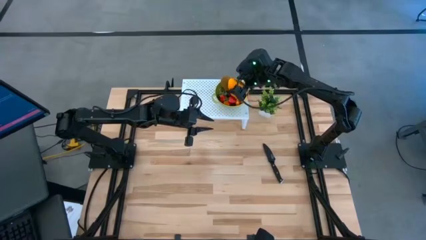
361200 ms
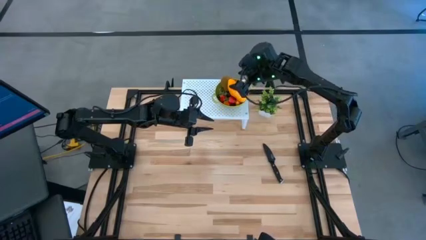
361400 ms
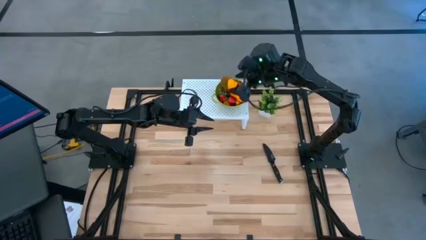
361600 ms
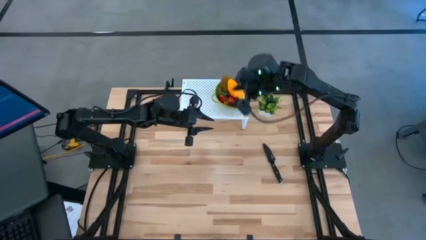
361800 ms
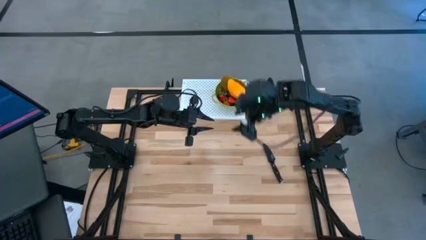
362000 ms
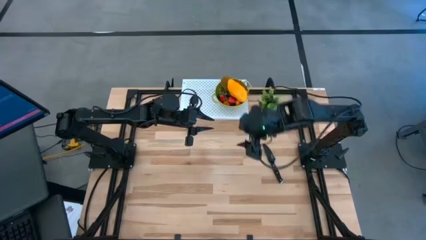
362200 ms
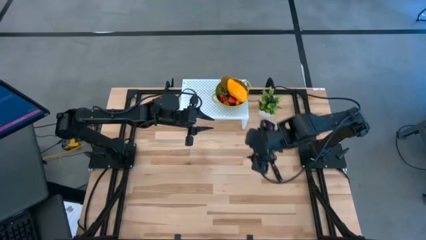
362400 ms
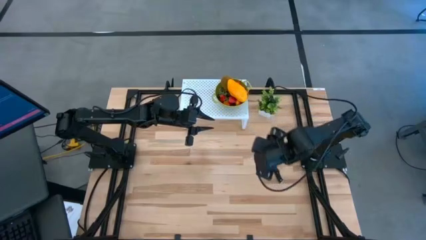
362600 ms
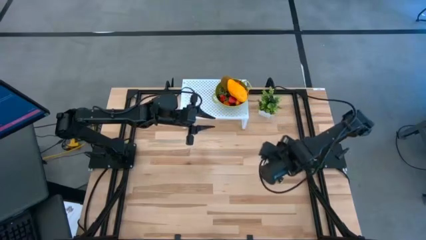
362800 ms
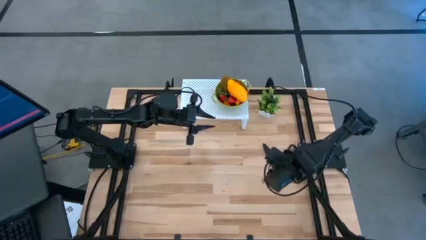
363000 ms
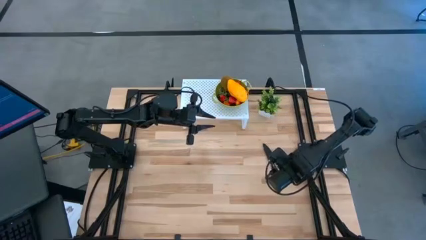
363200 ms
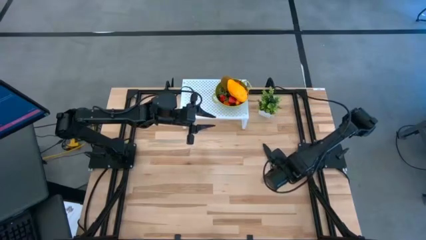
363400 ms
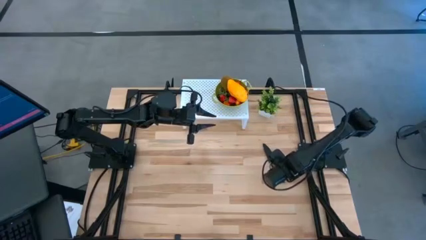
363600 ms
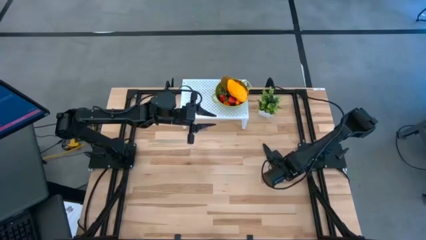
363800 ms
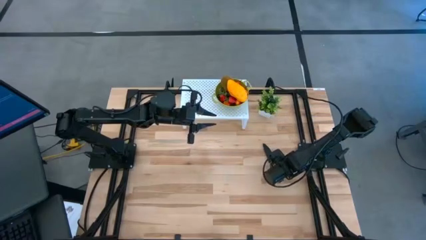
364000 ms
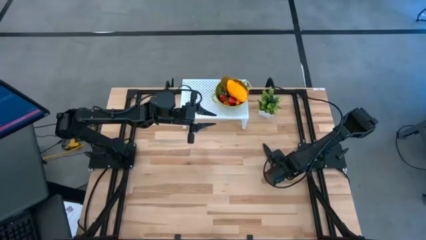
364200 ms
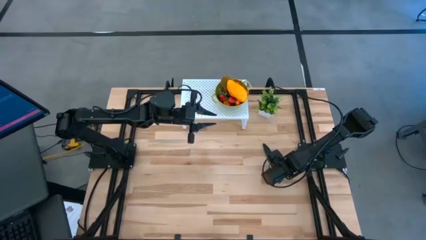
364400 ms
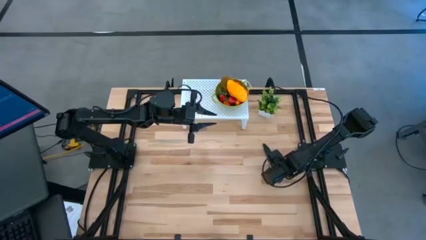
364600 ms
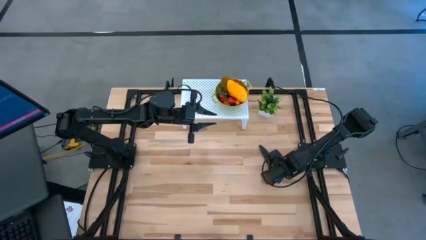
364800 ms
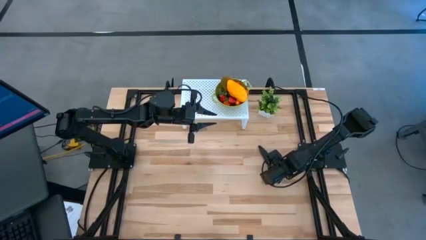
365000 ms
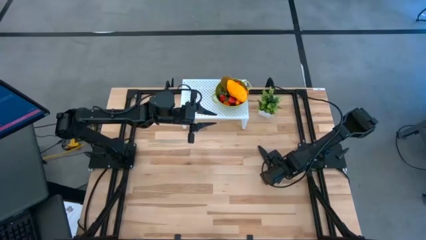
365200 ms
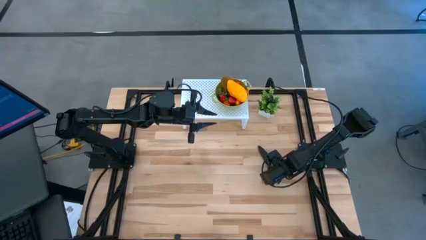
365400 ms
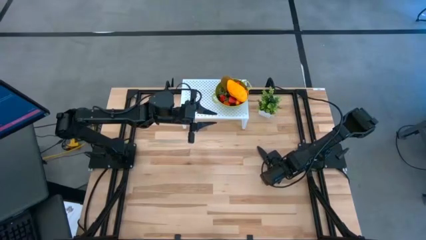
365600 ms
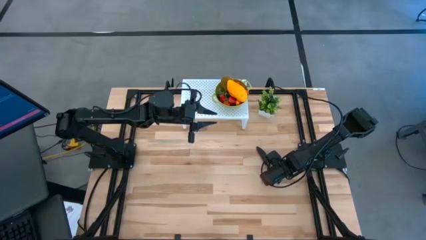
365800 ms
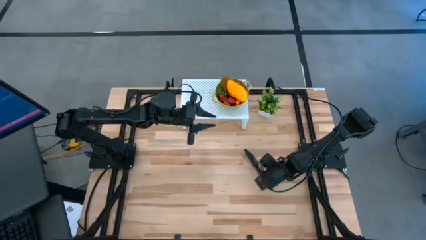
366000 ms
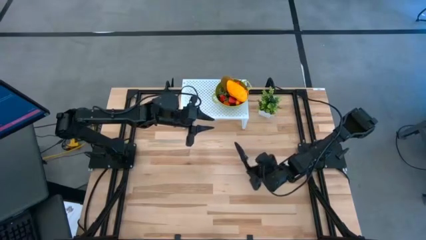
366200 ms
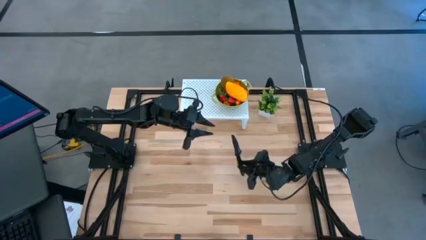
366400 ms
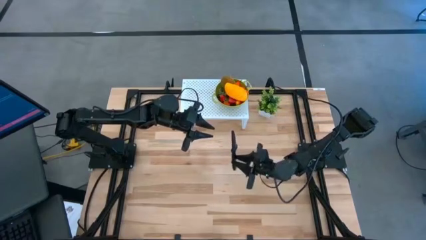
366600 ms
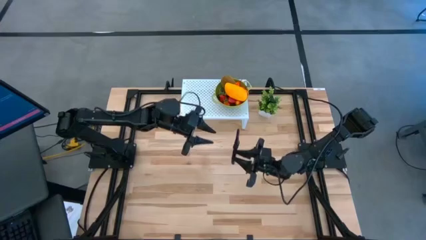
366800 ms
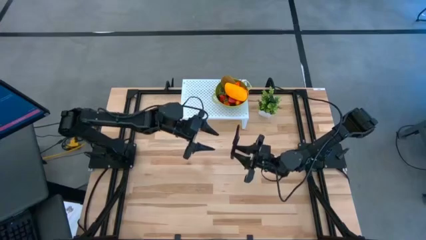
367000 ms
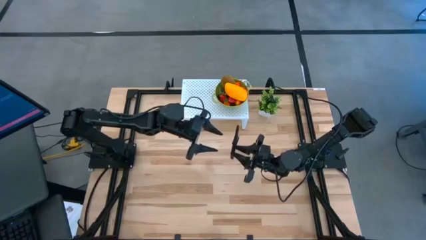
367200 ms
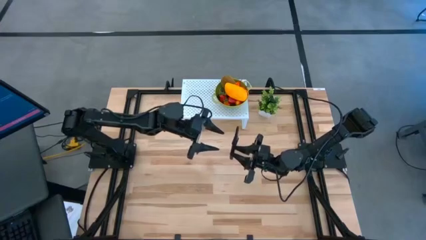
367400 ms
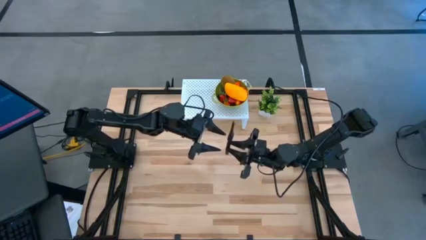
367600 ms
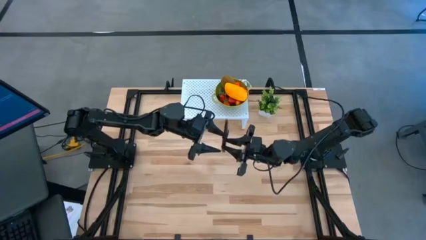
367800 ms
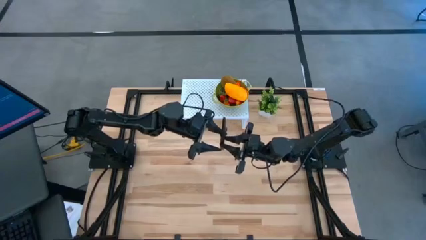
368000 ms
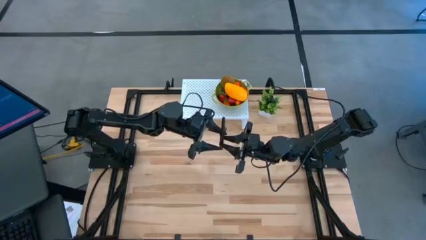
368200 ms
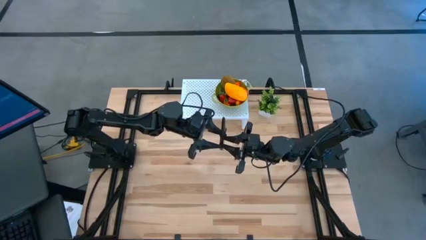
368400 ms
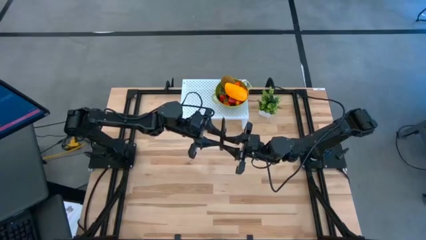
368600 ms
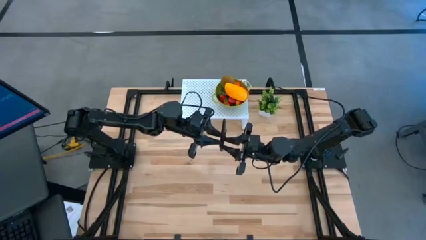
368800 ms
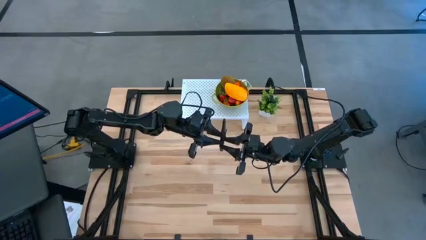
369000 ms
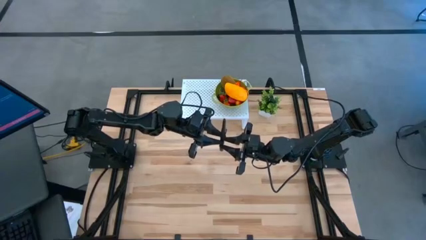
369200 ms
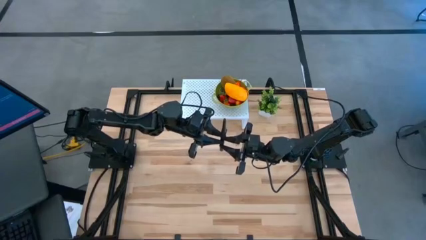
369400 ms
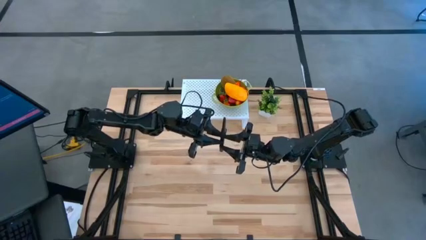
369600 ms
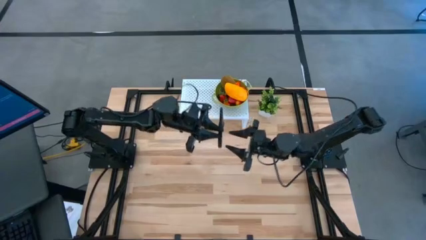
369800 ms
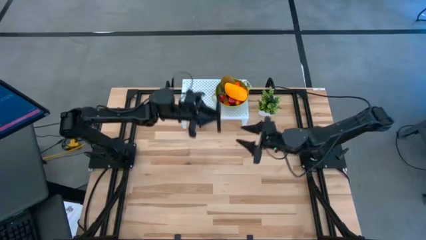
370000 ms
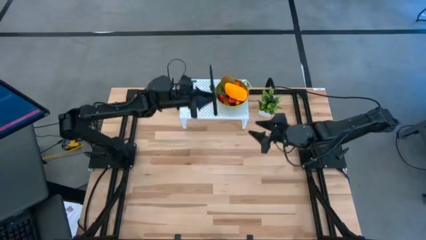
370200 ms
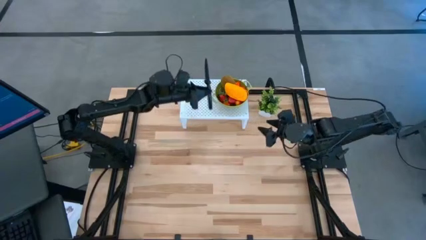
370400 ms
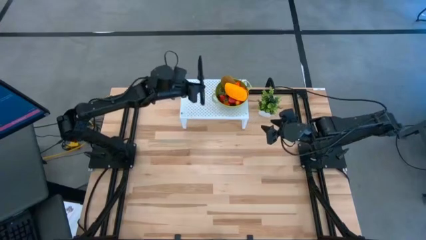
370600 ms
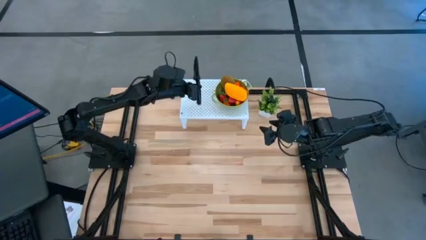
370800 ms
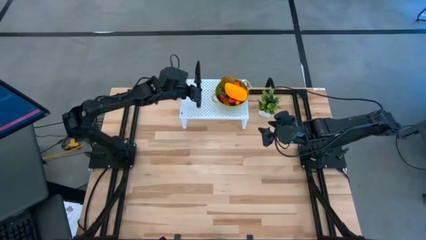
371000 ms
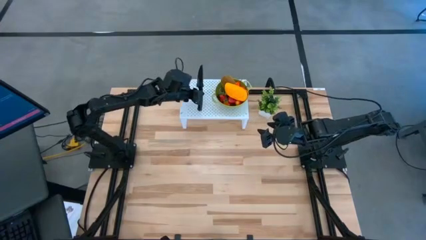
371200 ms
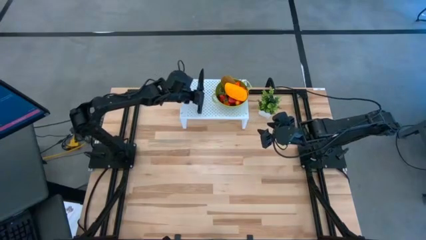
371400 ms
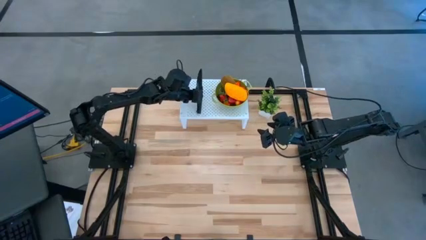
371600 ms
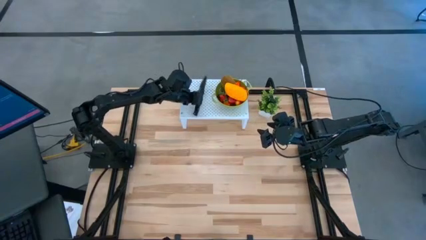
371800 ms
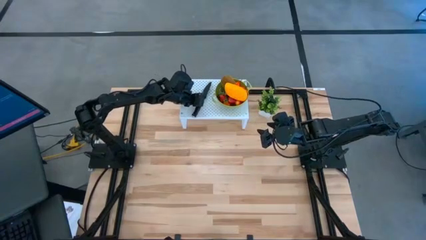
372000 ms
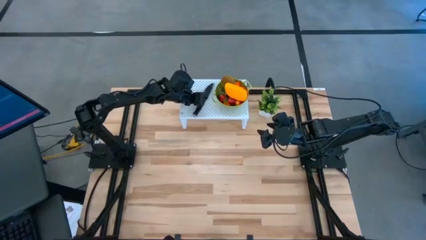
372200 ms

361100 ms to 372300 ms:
Task: Pick & Place Fruit
Put the black knife on the shelf

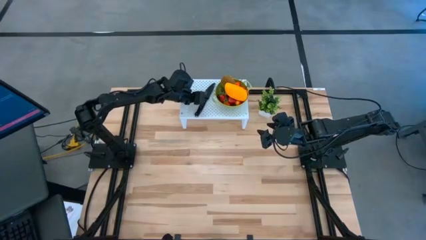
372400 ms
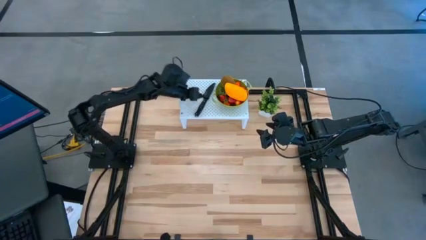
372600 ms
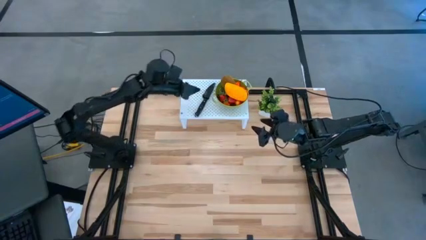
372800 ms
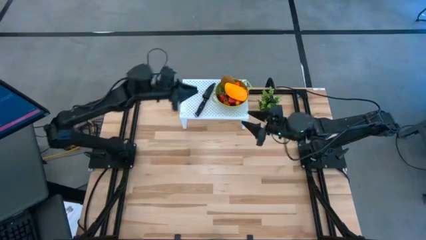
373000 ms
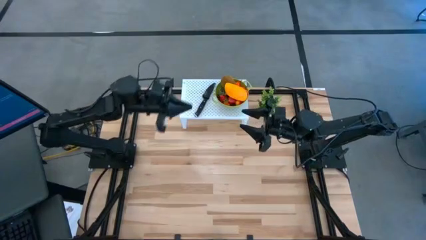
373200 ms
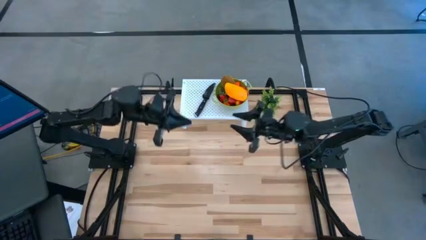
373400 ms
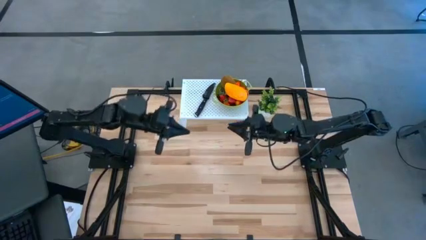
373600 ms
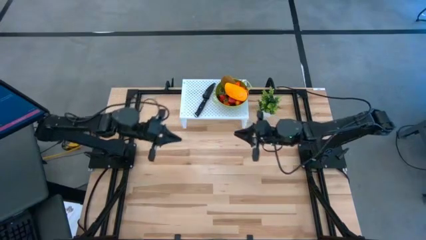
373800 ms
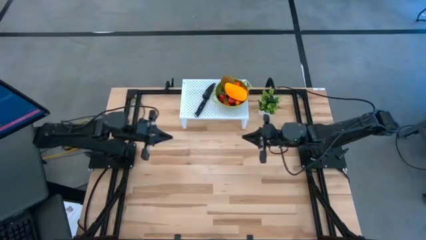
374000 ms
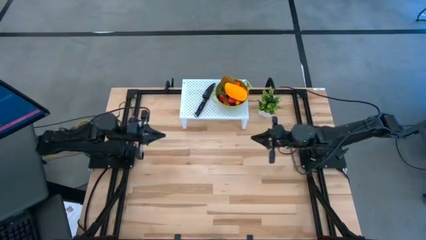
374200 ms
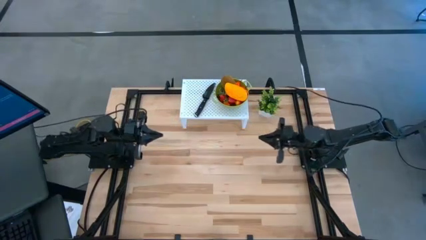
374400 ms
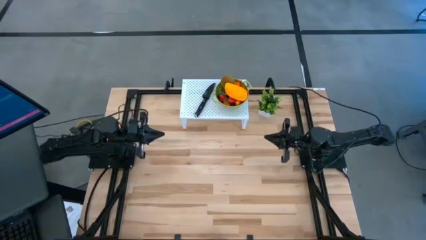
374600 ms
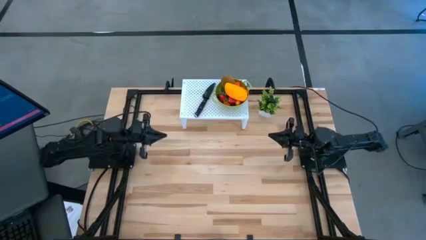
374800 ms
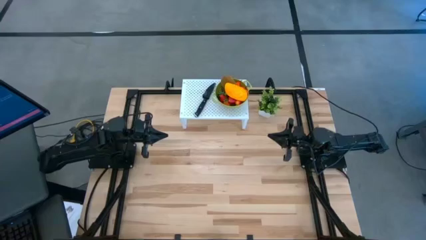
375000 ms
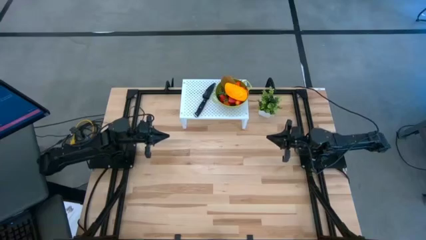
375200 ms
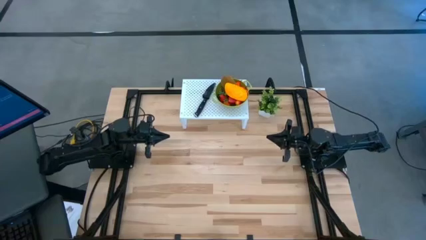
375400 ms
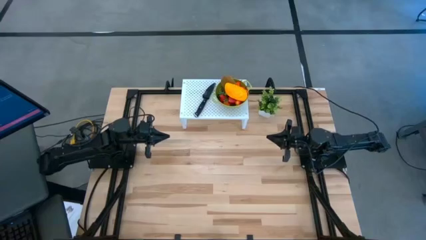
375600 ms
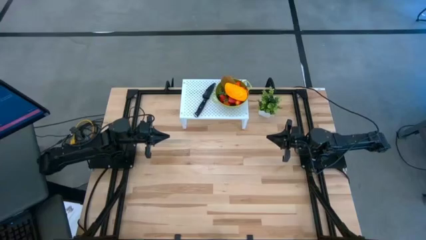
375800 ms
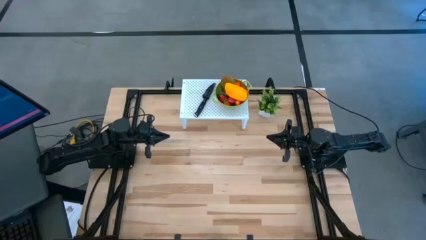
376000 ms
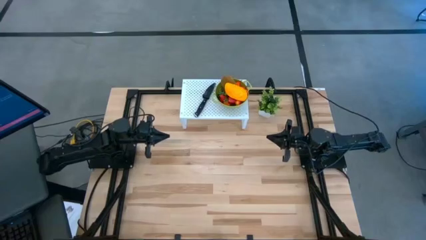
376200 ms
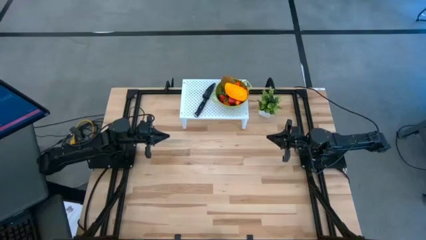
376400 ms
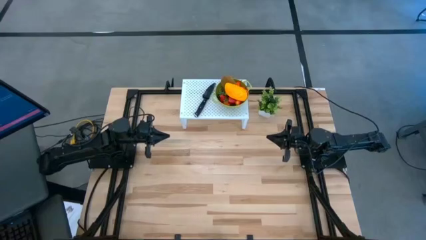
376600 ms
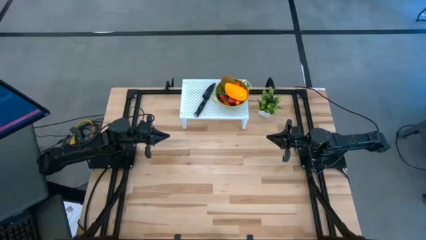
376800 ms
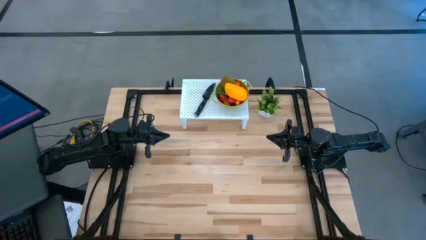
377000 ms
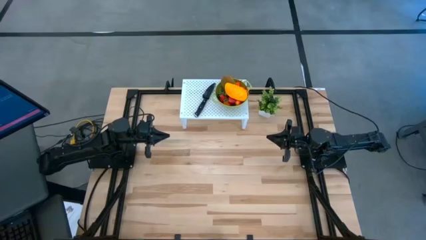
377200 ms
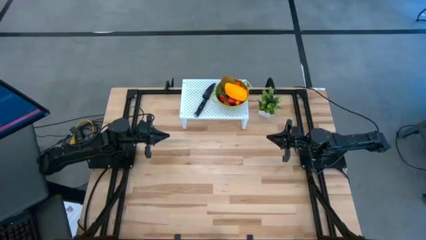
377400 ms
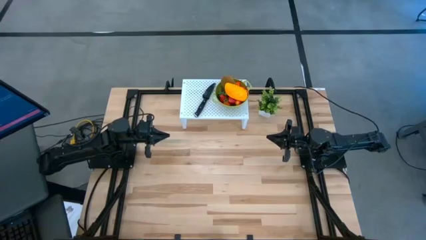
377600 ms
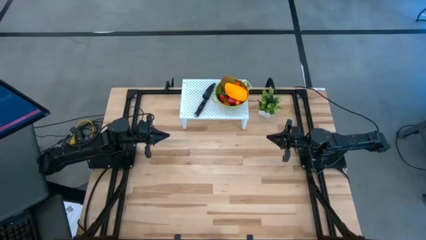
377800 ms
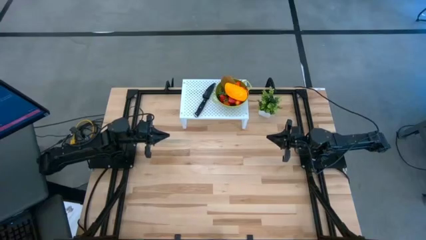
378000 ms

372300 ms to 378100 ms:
Return to Home Position
